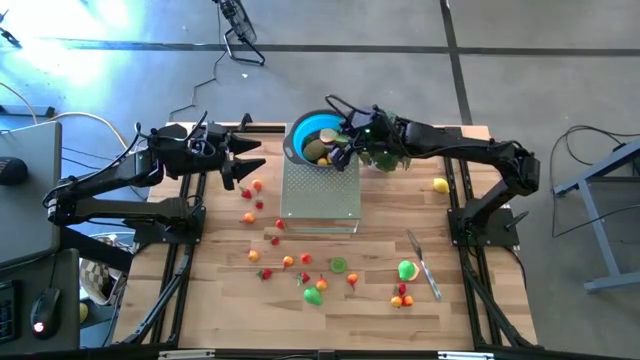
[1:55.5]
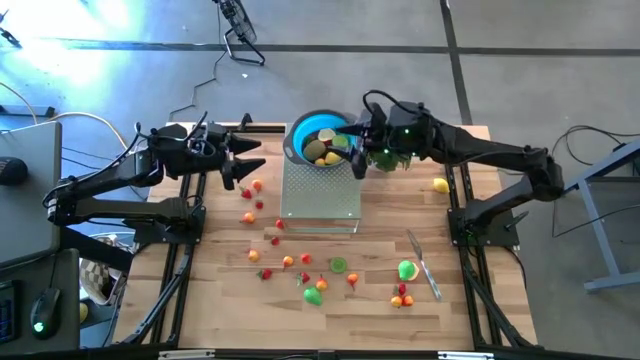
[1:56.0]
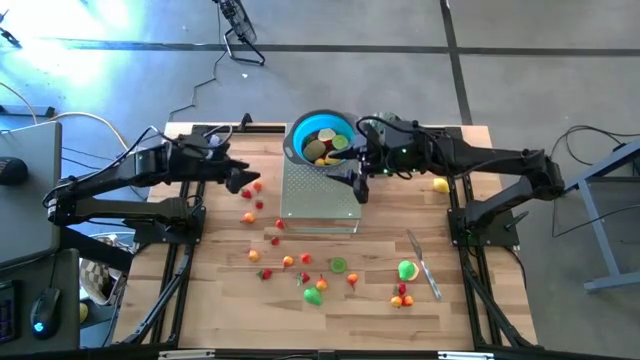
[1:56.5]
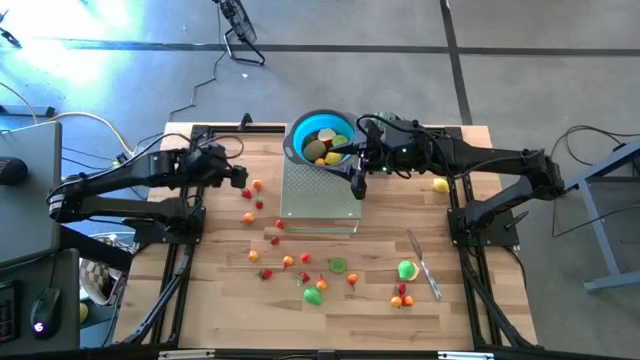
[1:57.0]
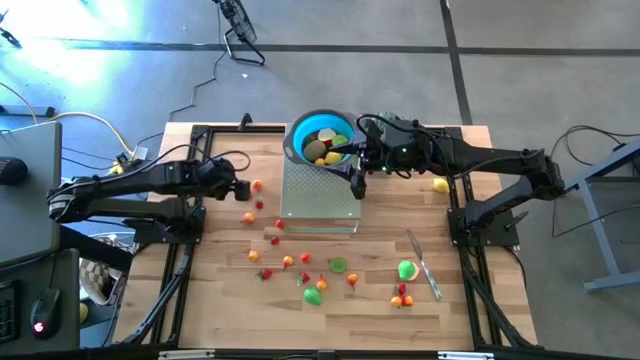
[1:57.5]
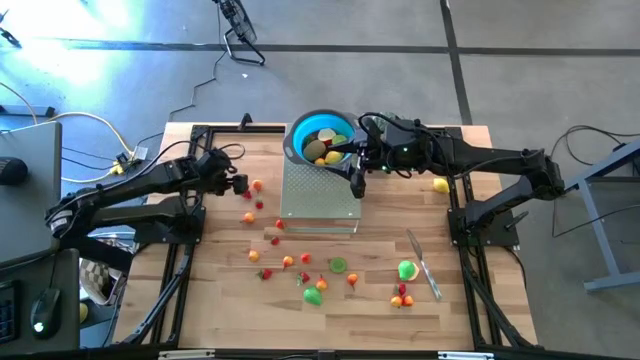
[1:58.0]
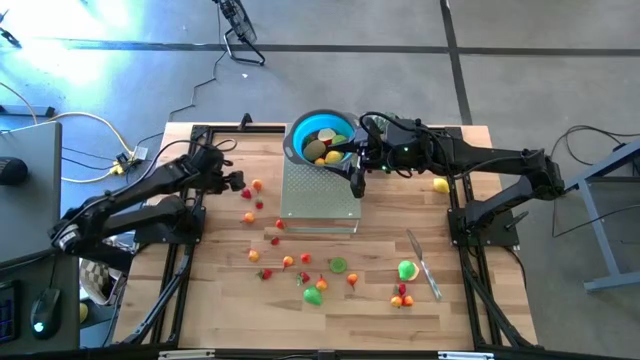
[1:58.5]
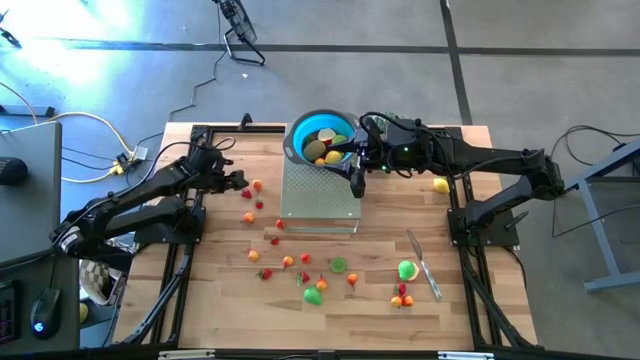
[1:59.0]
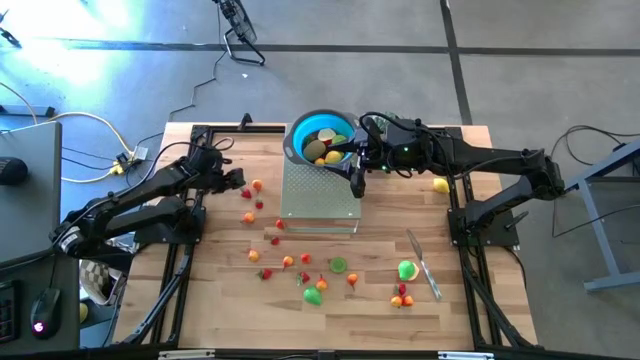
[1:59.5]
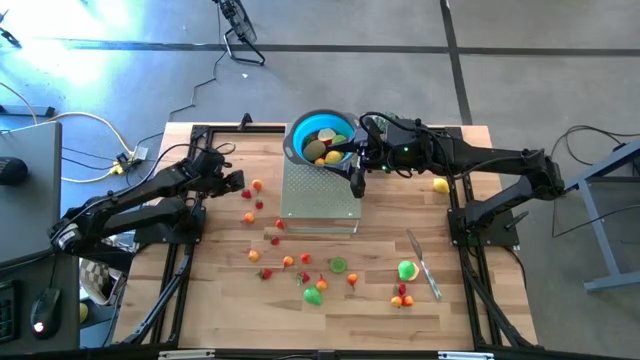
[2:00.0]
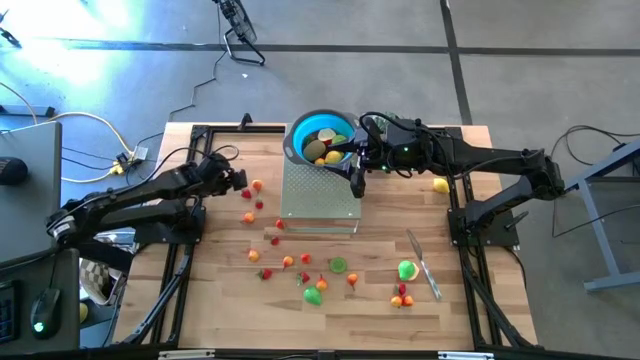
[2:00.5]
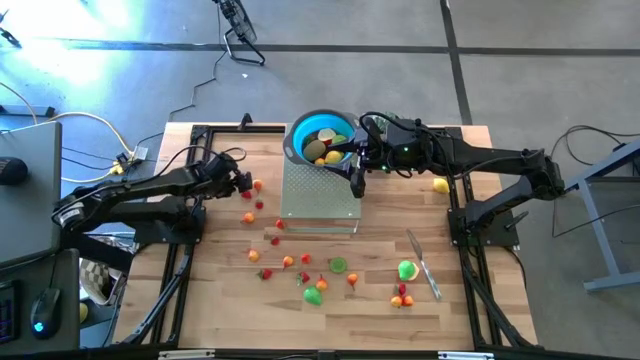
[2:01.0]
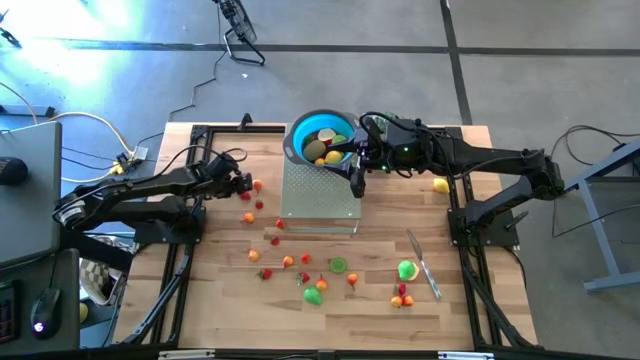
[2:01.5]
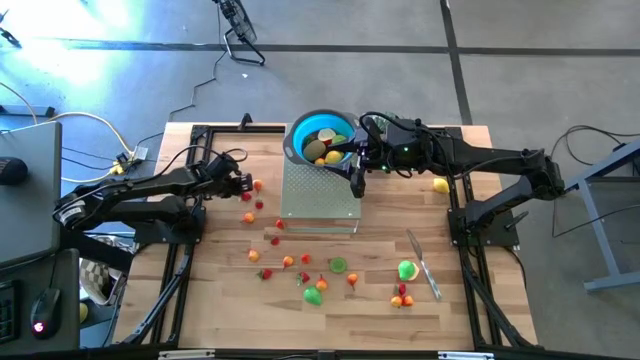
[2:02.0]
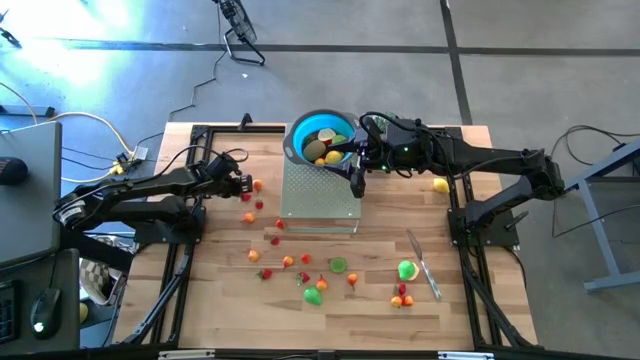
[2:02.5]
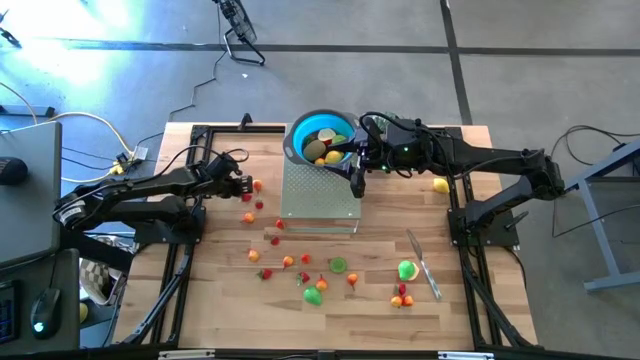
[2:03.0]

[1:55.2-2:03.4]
Task: Pick & Place Fruit
Put the red strawberry in the blue bowl on the shelf

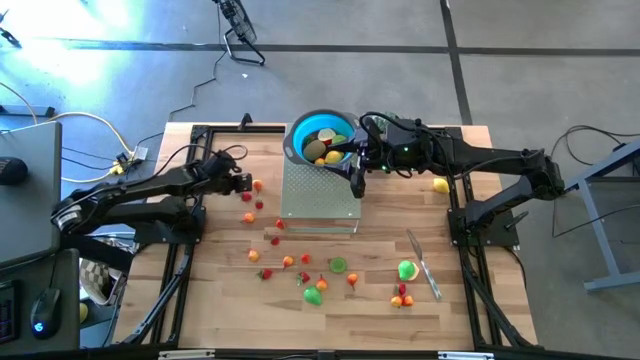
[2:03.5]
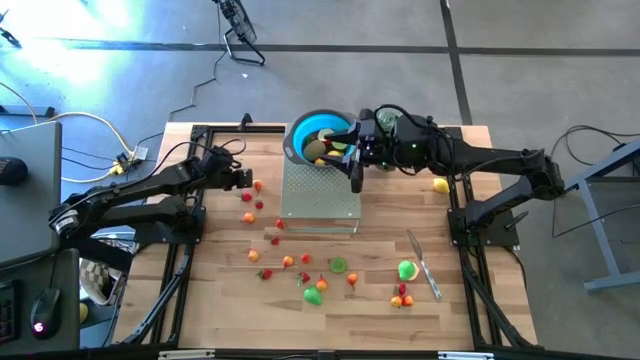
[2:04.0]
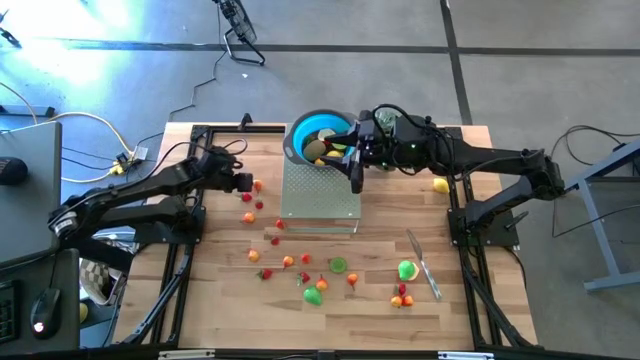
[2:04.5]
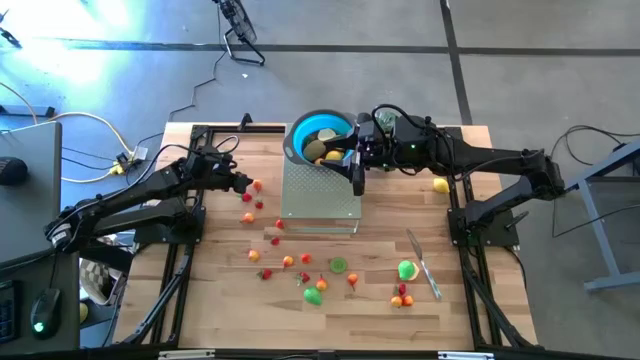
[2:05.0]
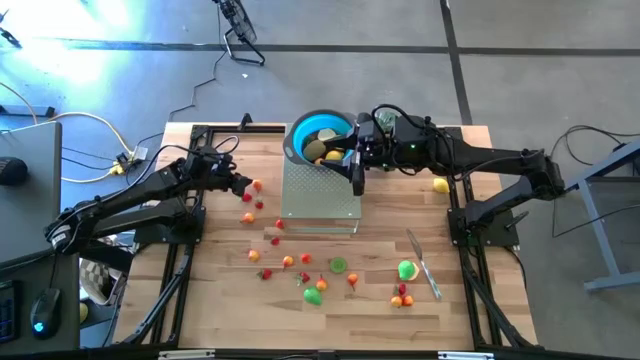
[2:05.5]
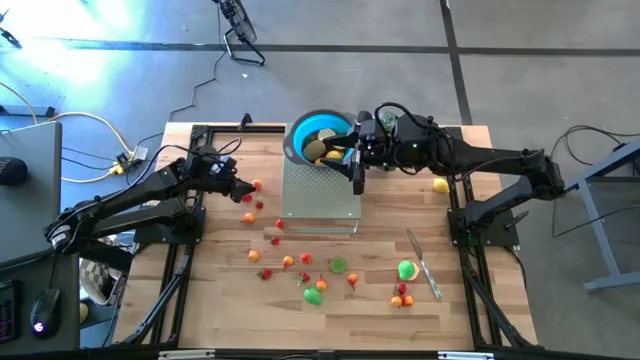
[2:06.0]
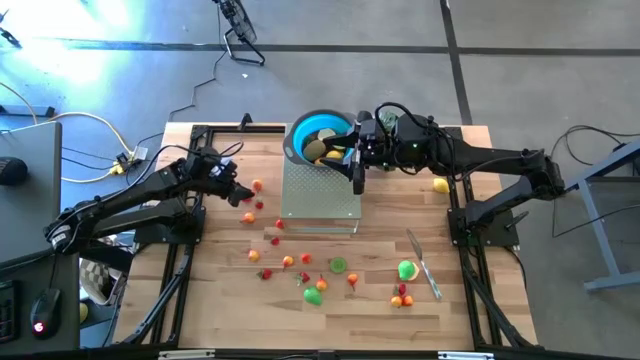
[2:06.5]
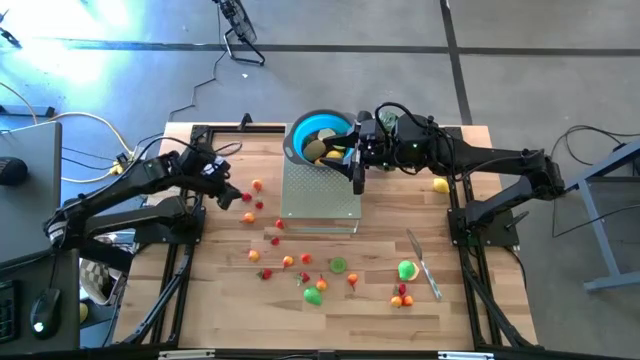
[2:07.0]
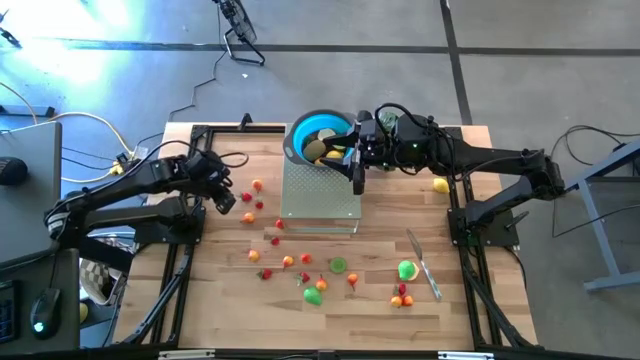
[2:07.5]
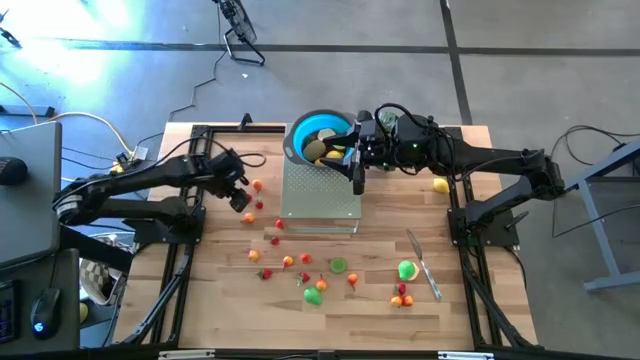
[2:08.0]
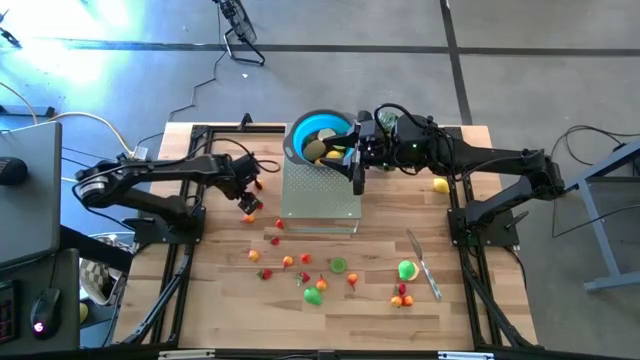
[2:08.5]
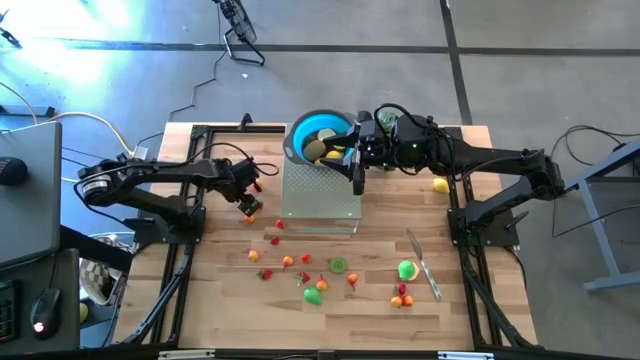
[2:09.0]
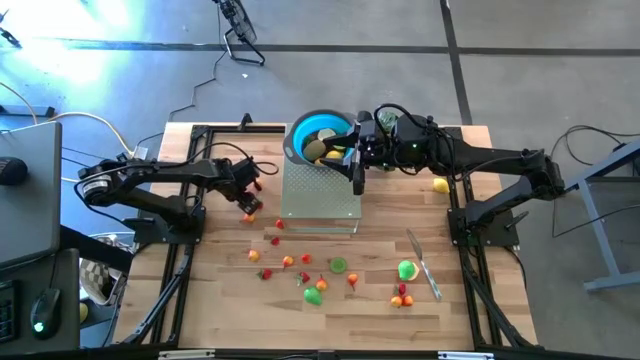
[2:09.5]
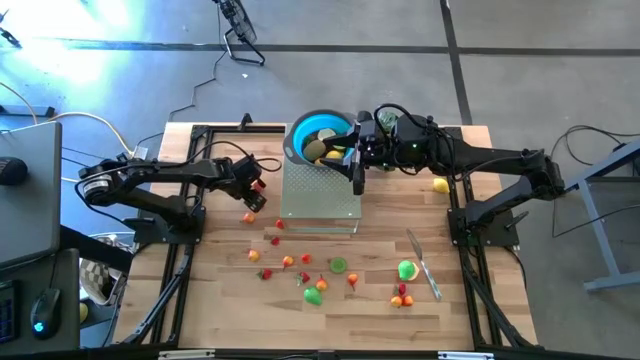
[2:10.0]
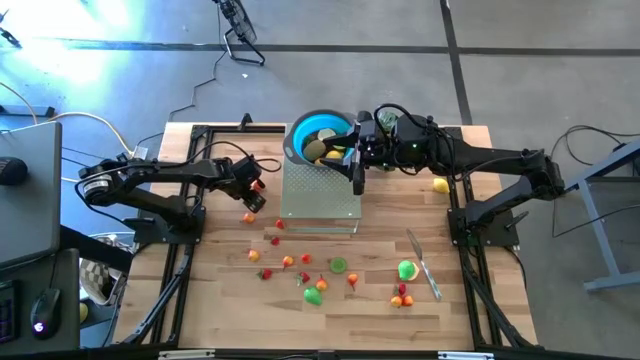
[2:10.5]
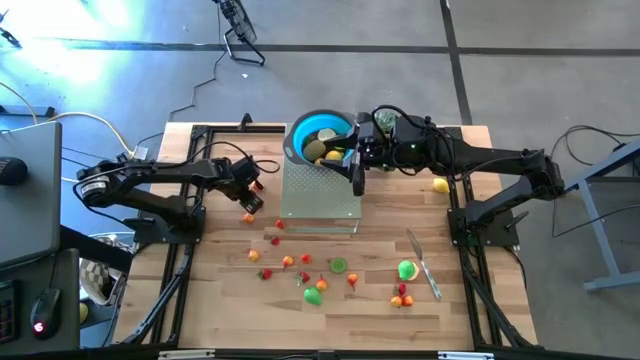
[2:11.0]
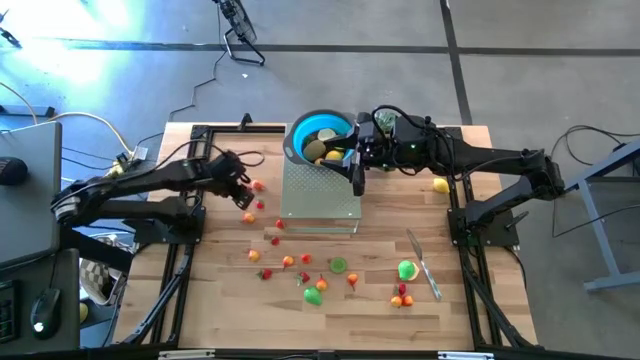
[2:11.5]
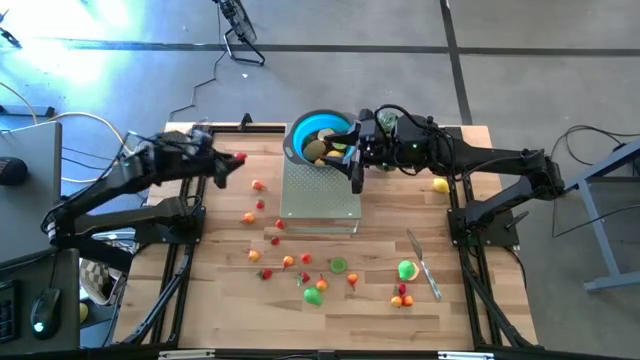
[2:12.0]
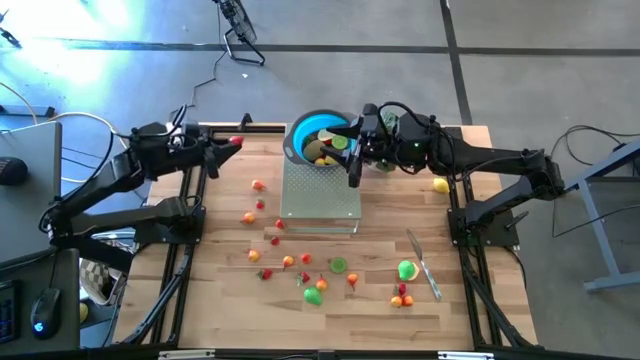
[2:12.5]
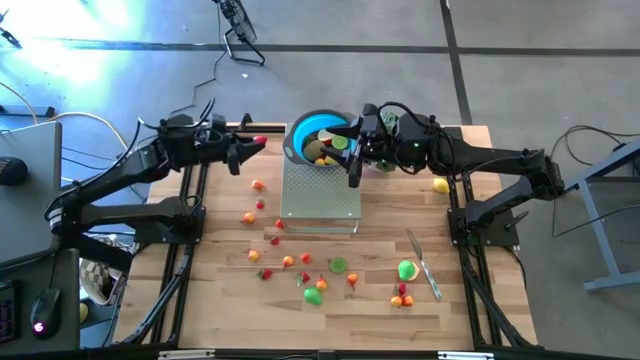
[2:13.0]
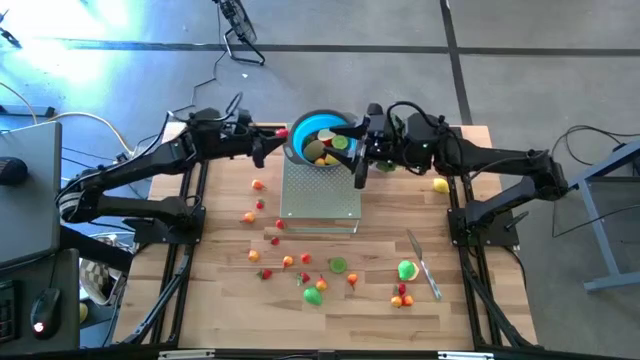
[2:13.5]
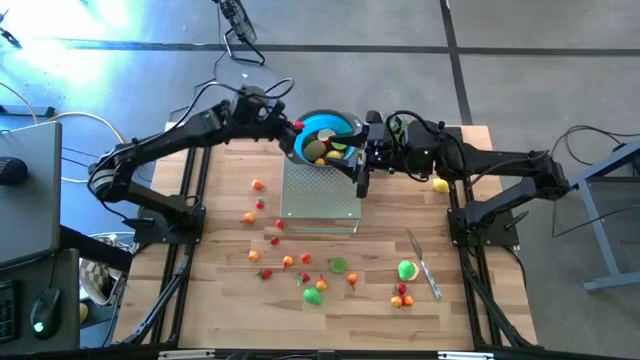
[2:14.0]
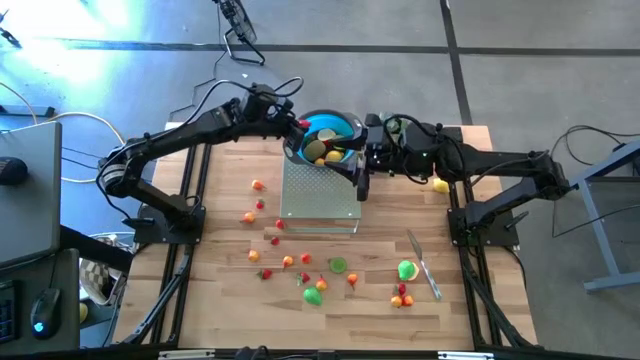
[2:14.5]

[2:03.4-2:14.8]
Put the red strawberry in the blue bowl on the shelf

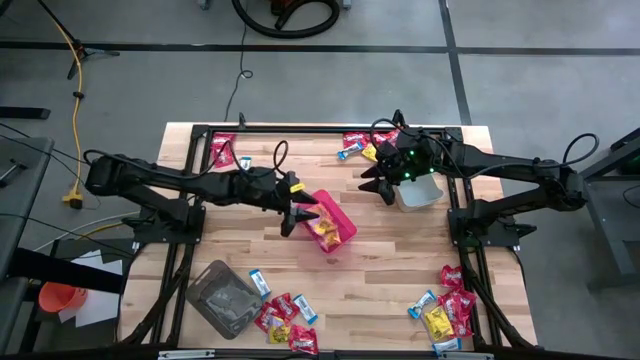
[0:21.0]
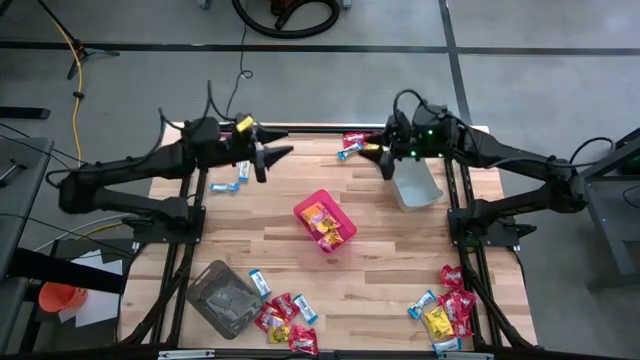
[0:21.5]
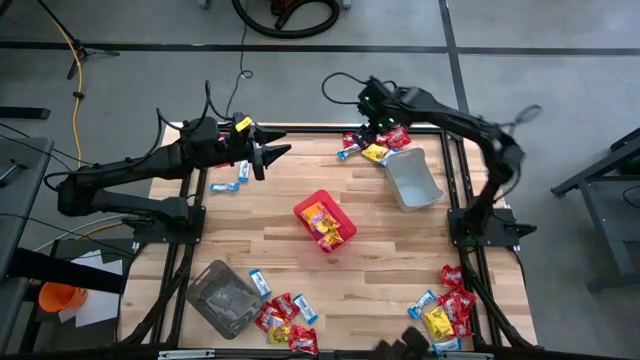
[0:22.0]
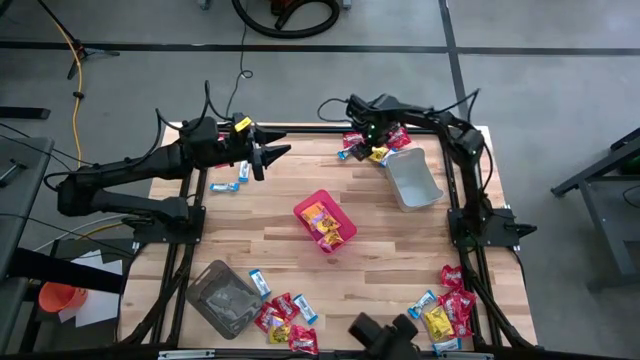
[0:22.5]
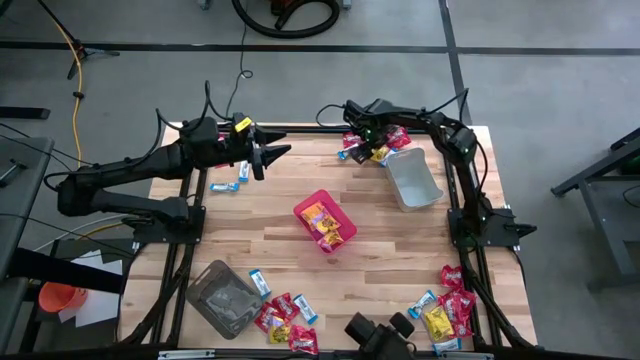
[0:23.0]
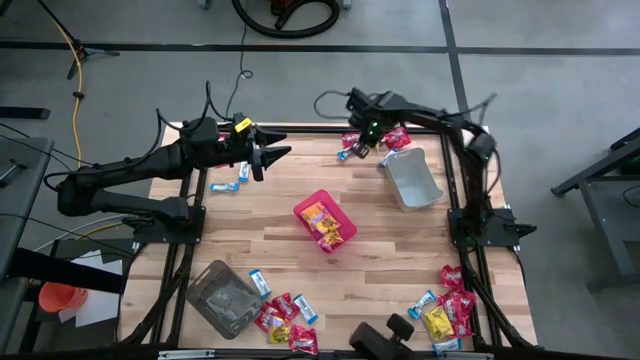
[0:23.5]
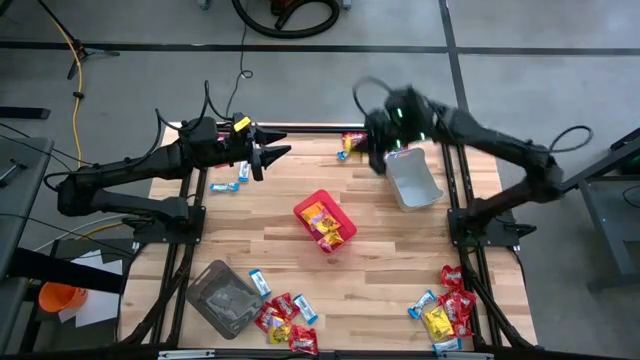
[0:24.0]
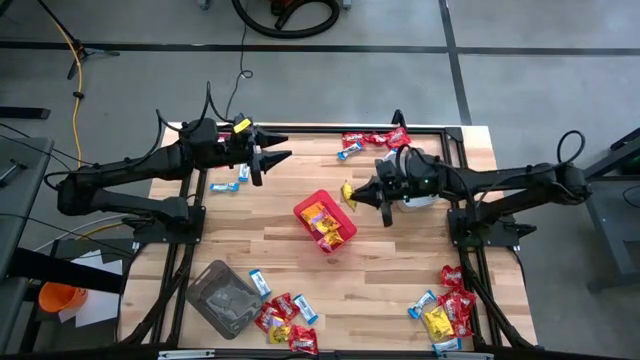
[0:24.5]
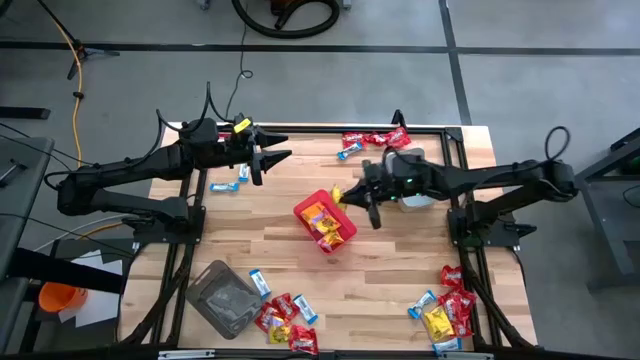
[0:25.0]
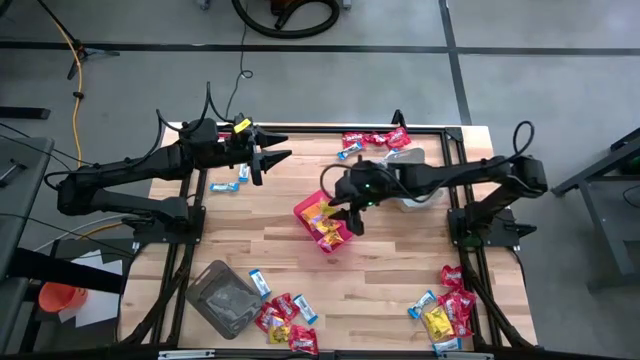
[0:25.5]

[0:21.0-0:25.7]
Task: Sort candy
Put the yellow candy into the red bin
